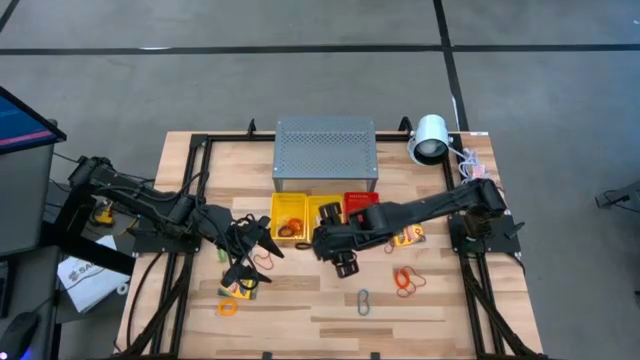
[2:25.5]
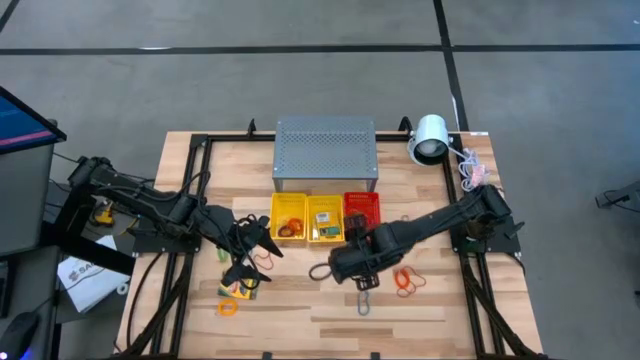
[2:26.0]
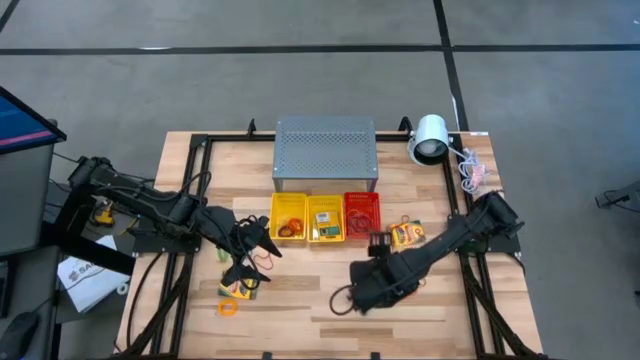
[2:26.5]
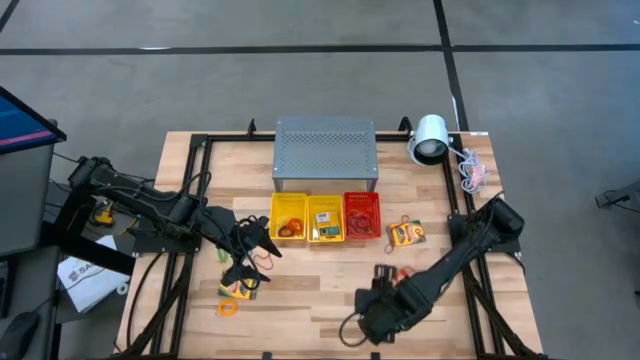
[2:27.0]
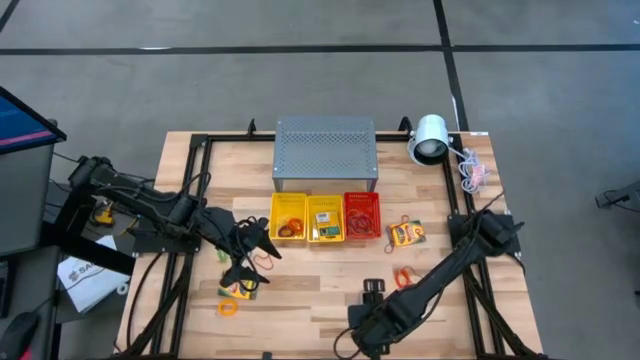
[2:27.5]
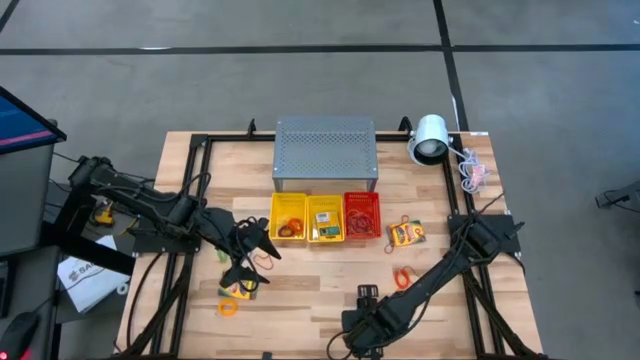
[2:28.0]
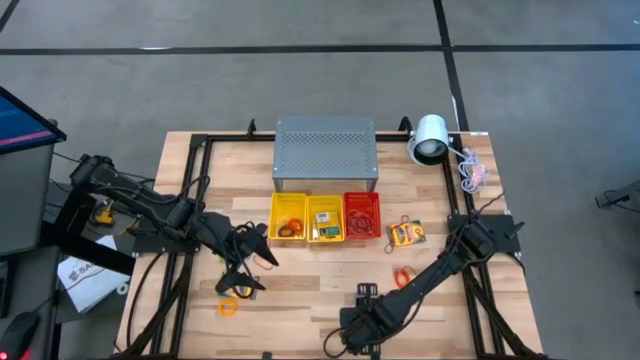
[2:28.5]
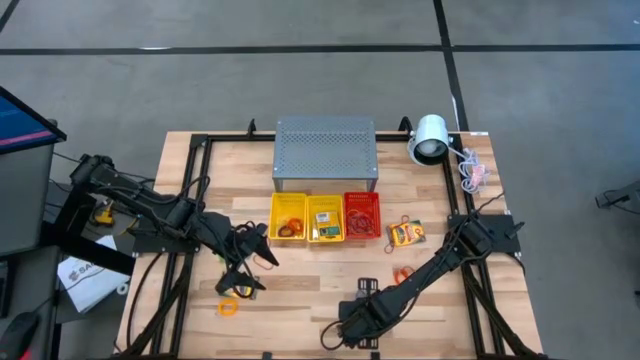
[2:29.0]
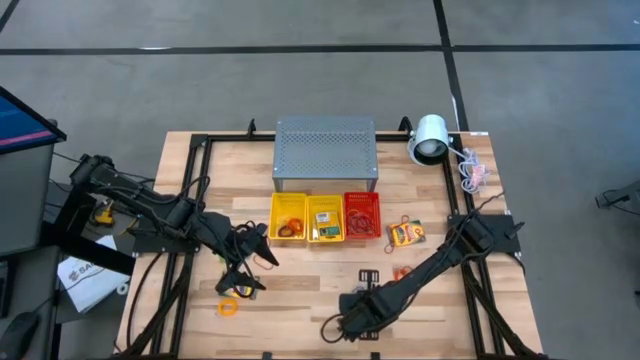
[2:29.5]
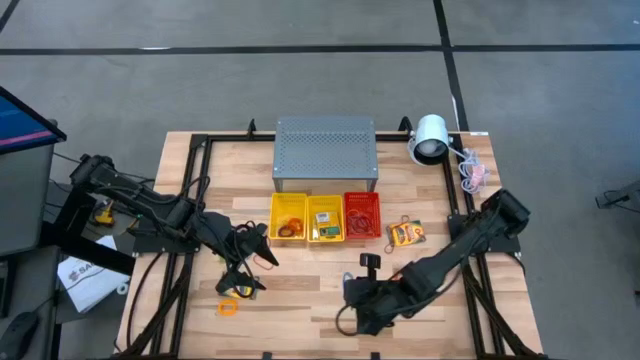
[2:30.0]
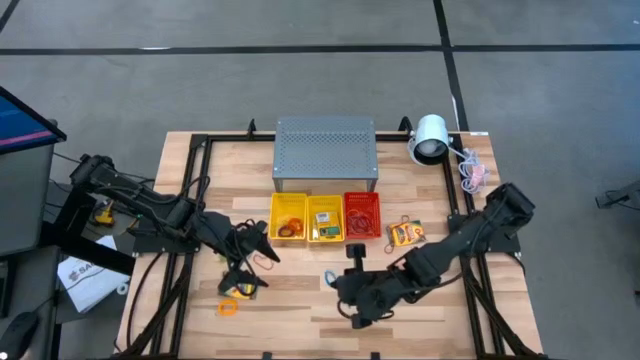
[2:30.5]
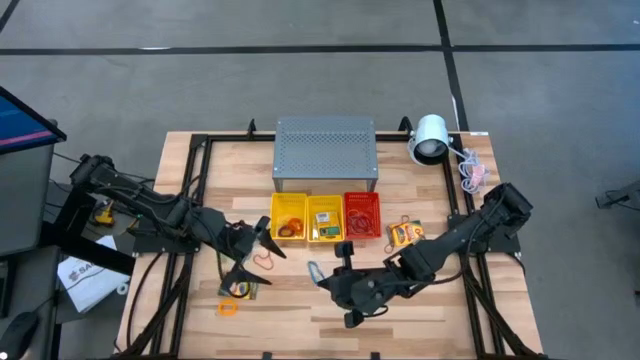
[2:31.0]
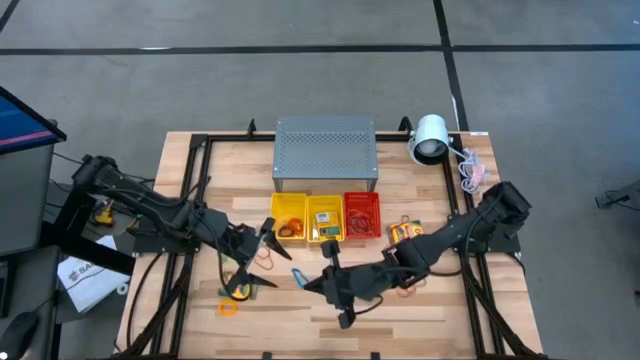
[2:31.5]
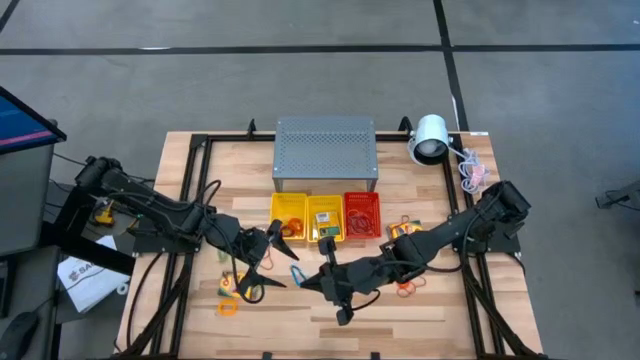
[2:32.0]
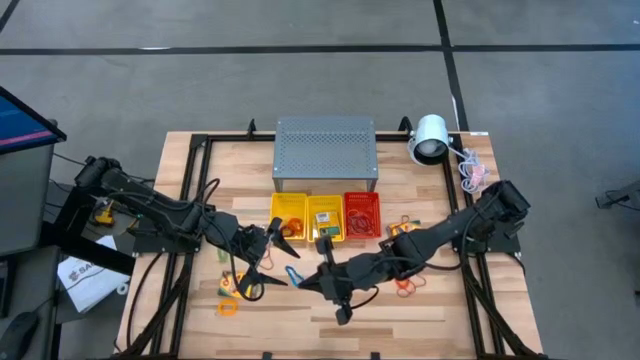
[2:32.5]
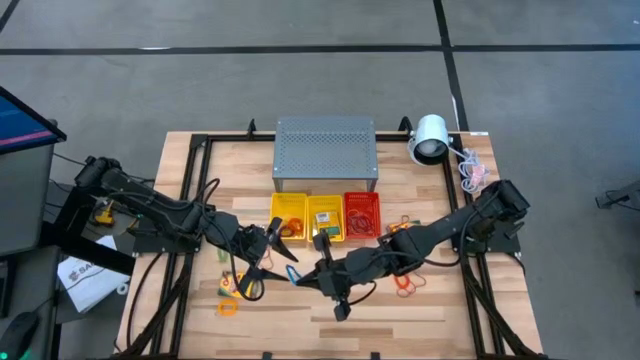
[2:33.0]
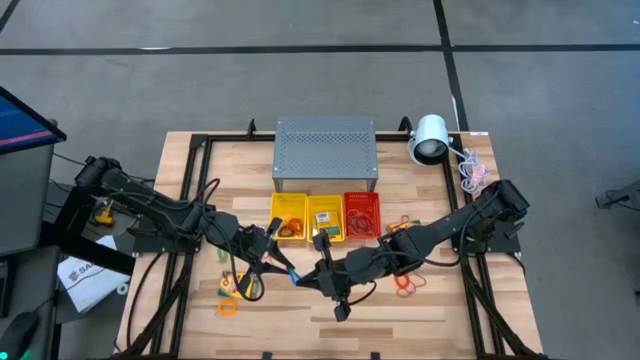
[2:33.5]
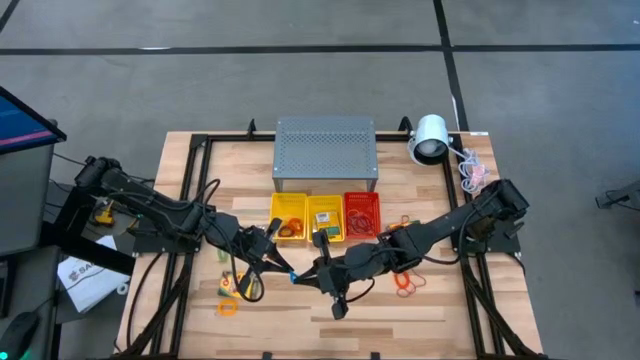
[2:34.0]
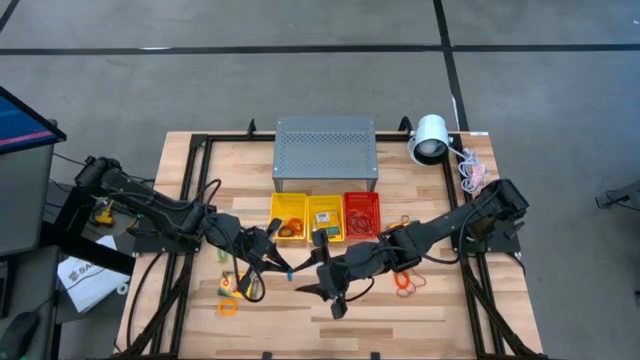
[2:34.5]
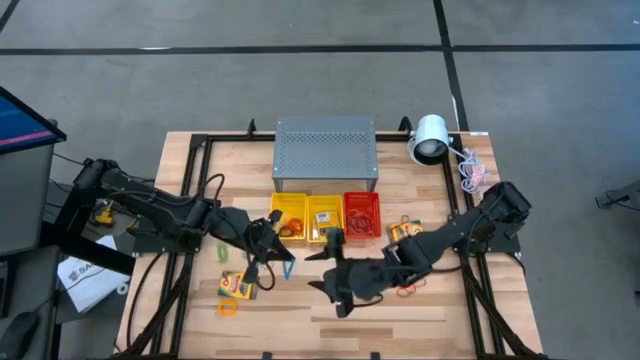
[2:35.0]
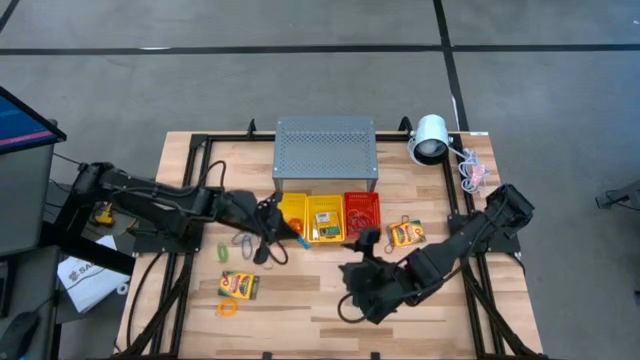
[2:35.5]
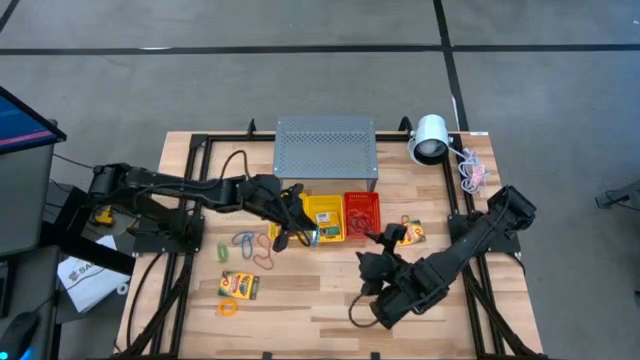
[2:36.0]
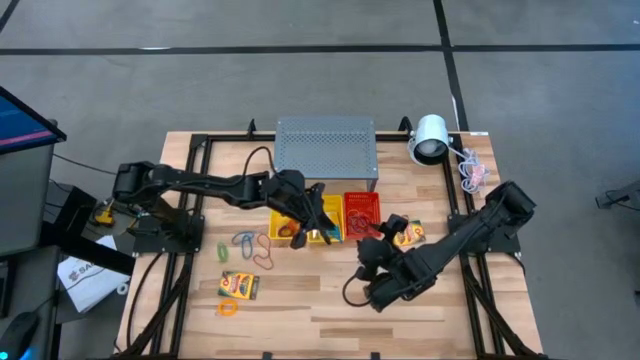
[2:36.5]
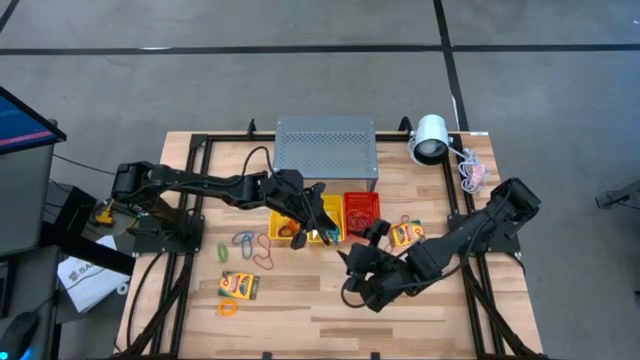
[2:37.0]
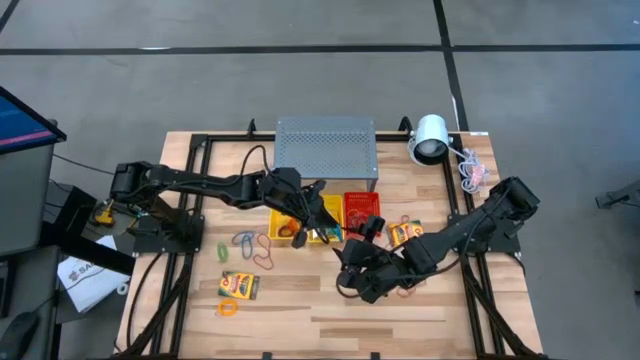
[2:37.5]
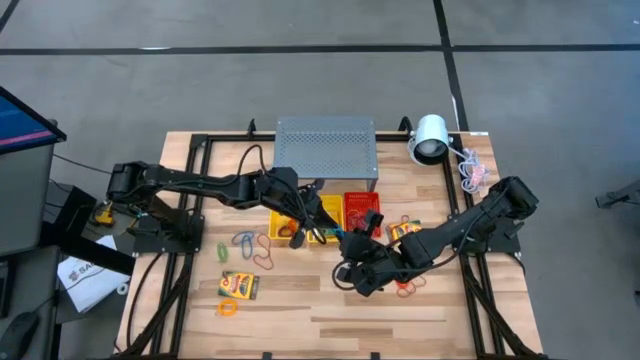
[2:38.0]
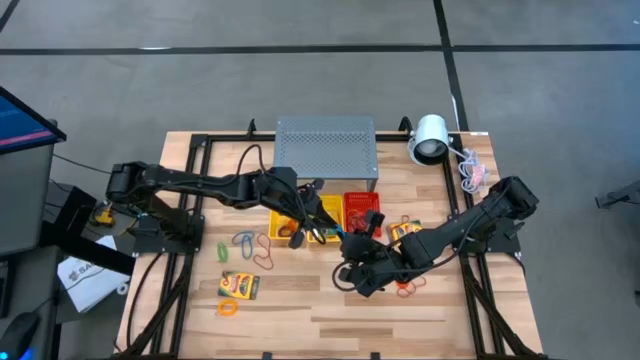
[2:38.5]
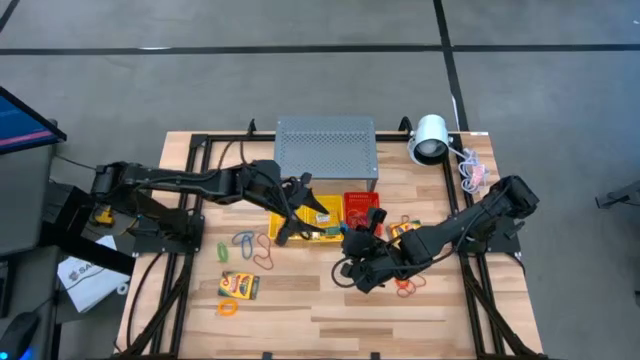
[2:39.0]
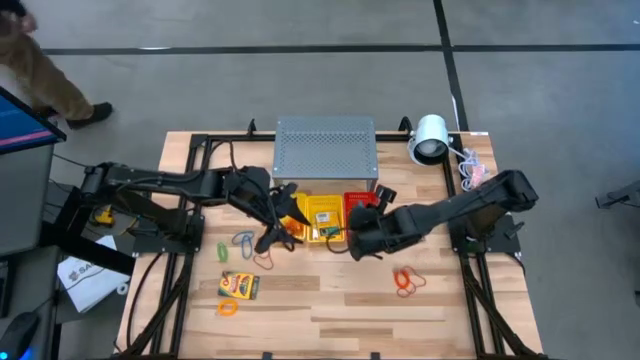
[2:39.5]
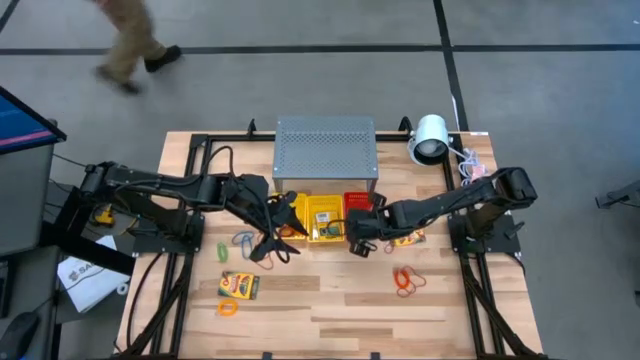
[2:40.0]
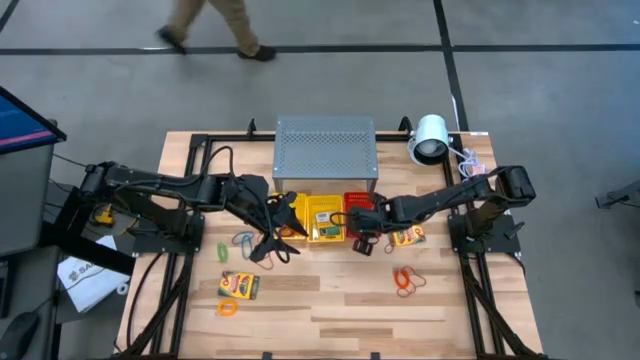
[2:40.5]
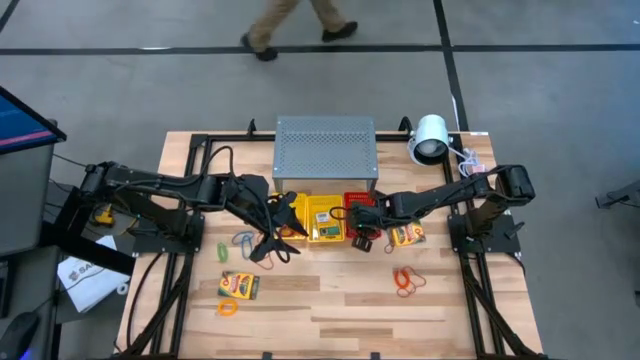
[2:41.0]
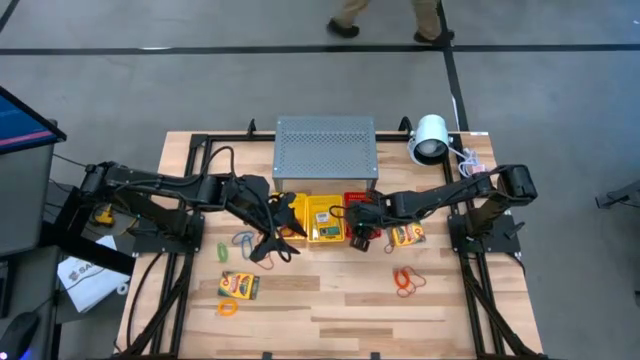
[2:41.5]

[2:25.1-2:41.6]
Task: Pick & Place Office Desk Supplies
Put the blue rubber band into the red bin

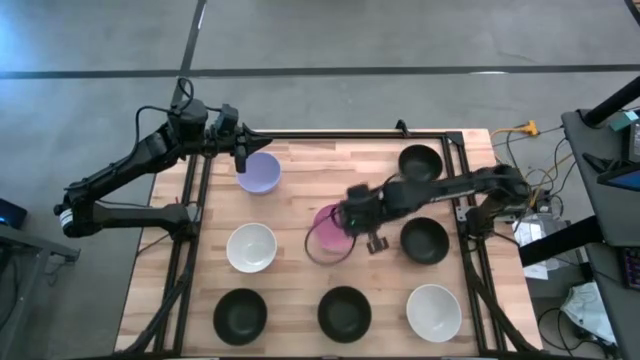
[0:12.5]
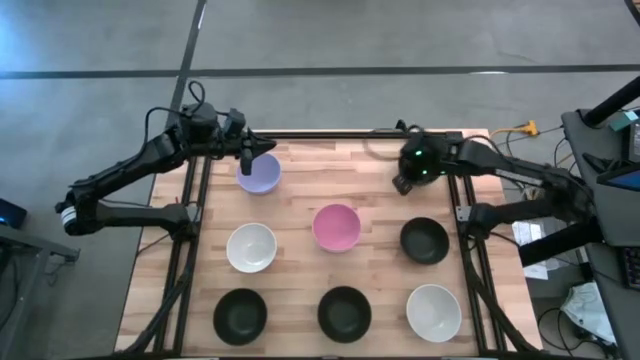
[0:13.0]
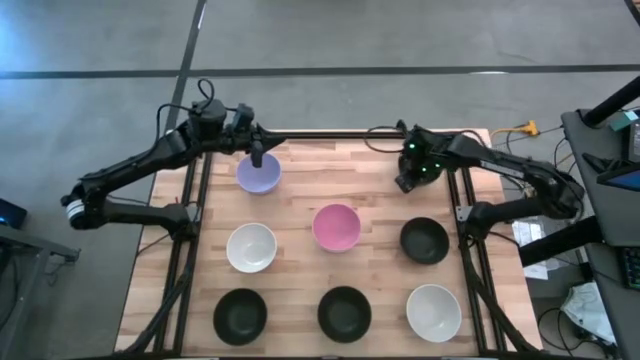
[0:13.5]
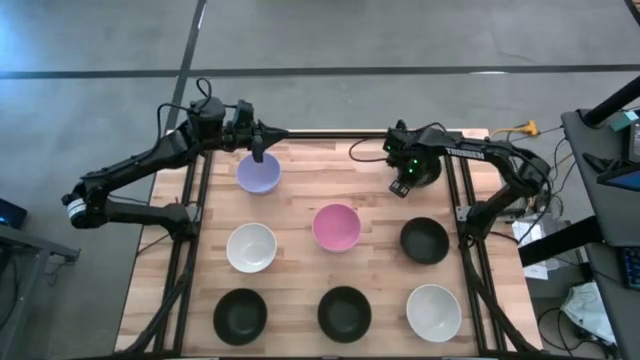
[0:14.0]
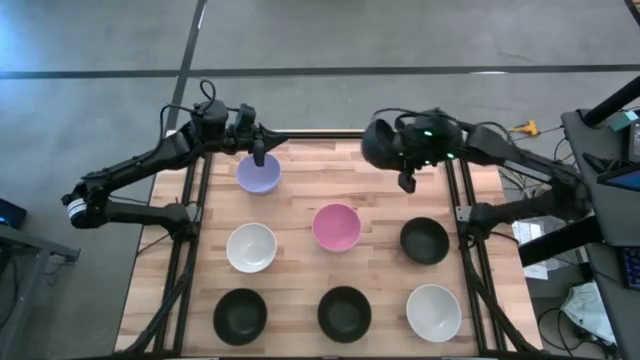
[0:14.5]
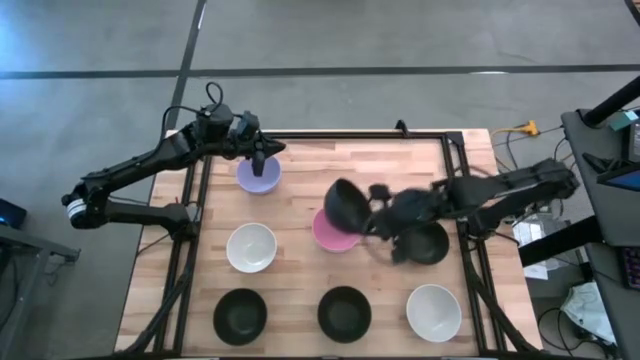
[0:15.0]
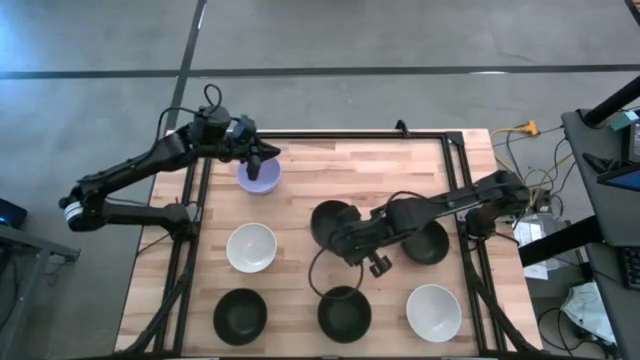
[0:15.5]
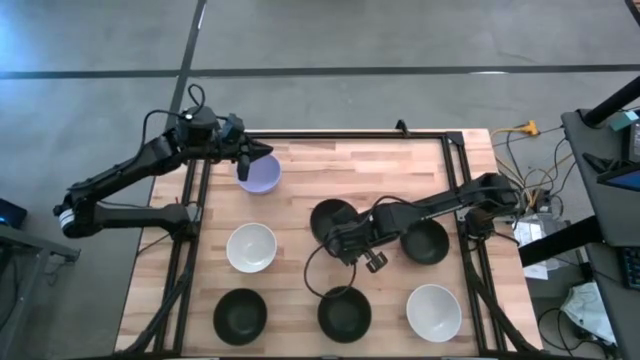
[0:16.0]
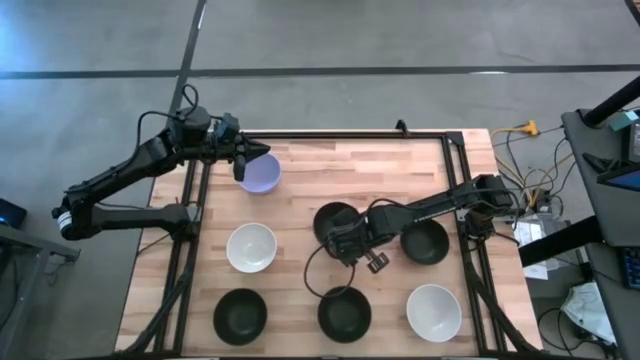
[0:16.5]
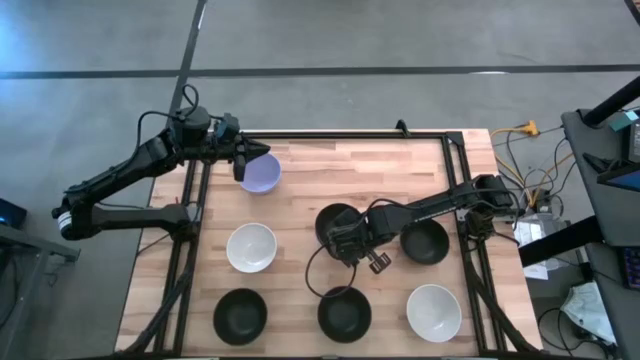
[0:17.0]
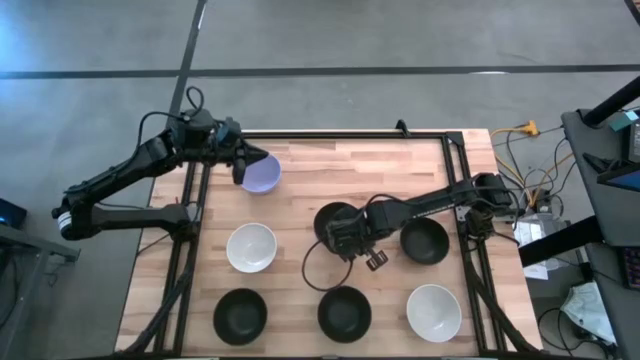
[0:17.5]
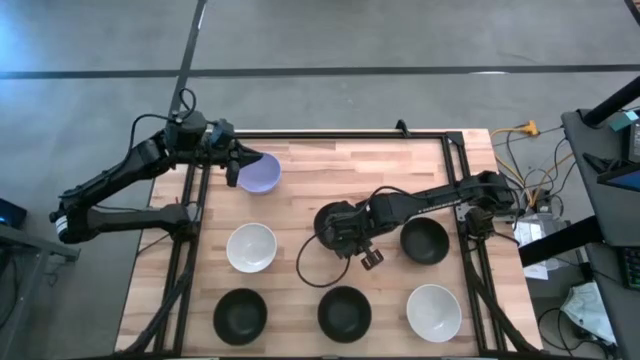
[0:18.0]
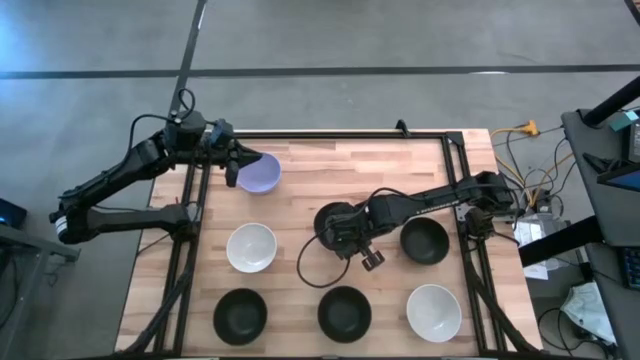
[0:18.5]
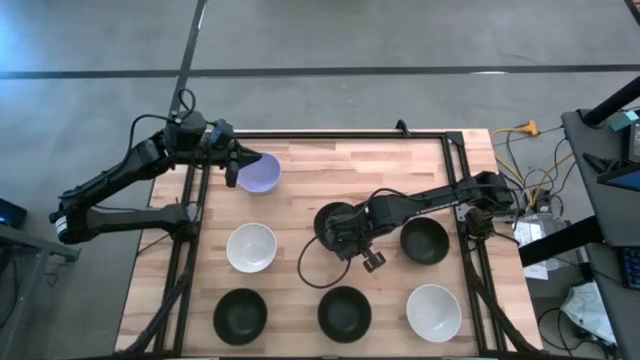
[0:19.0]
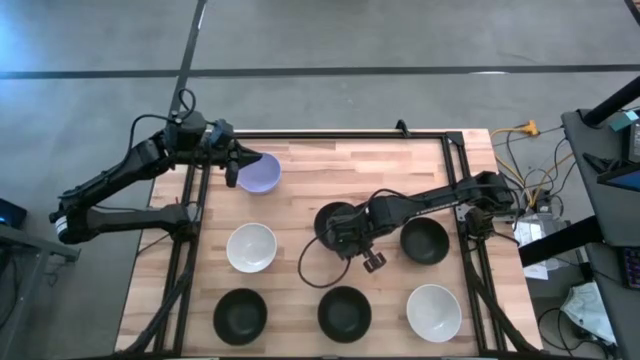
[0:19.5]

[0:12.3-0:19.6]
Task: Nest bowls inside each other
Stack the black bowl on the pink bowl
